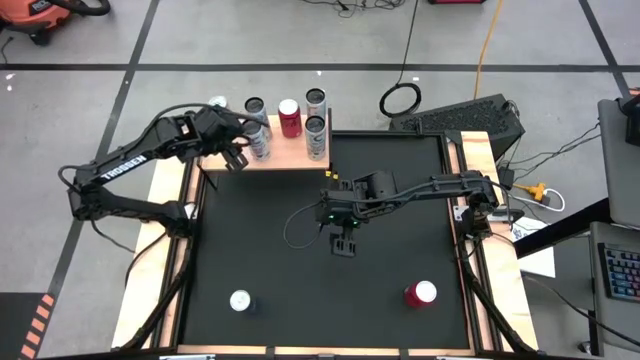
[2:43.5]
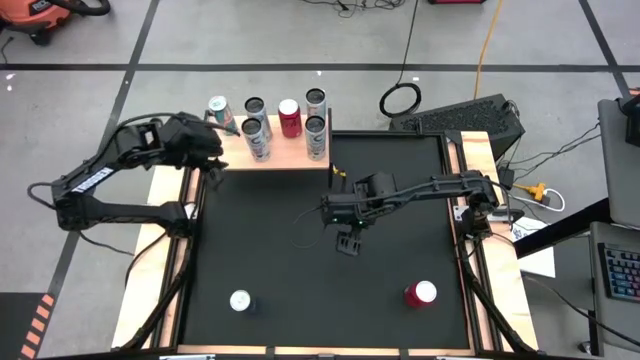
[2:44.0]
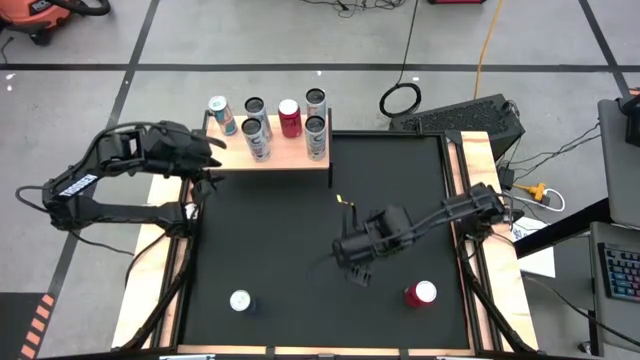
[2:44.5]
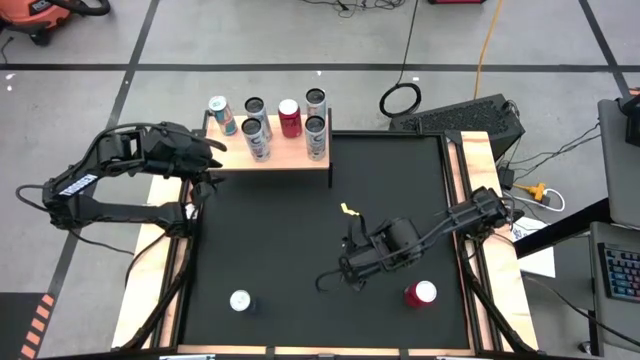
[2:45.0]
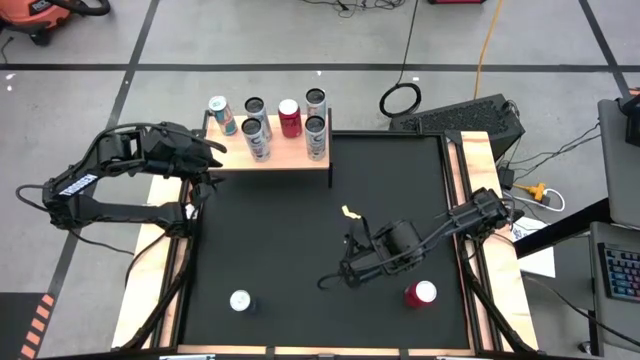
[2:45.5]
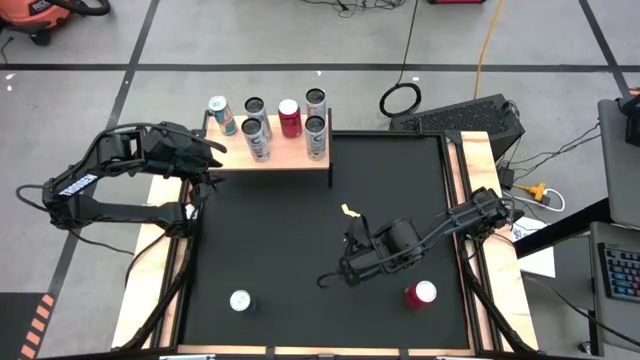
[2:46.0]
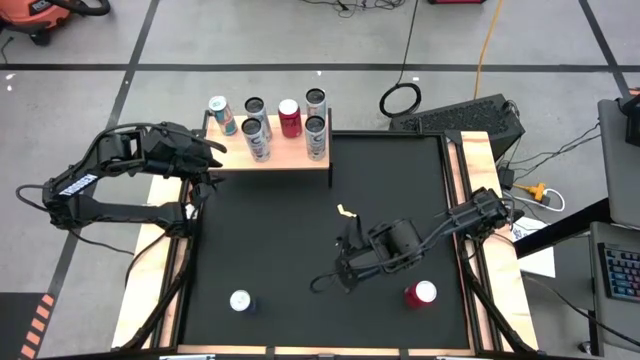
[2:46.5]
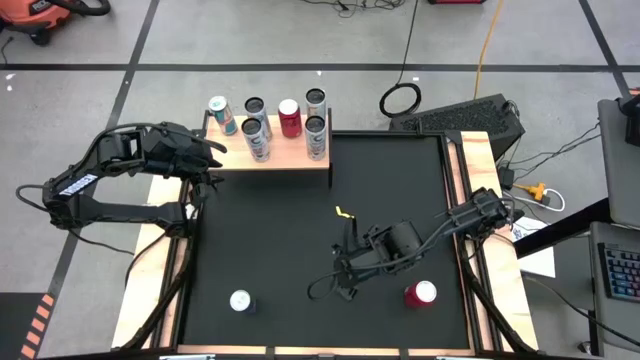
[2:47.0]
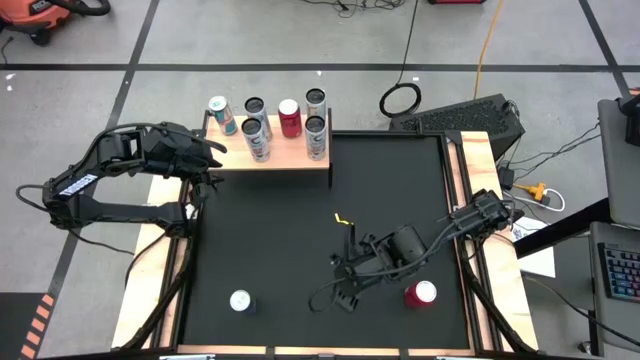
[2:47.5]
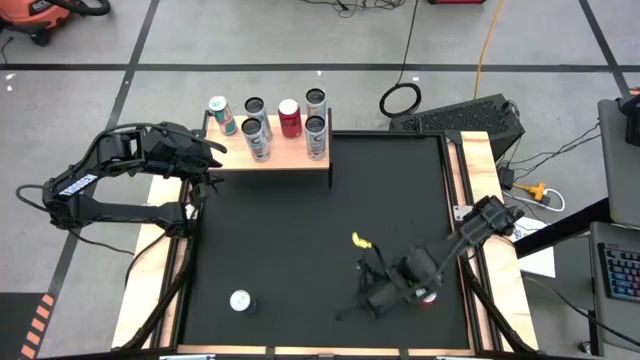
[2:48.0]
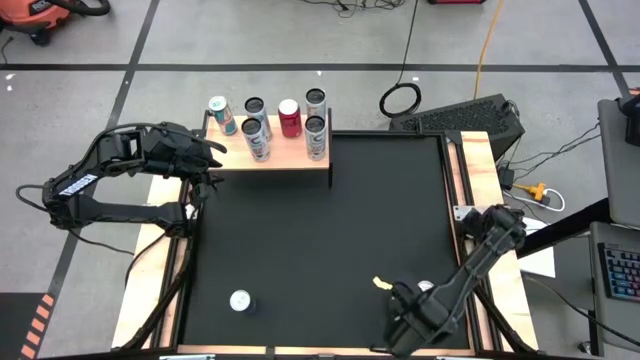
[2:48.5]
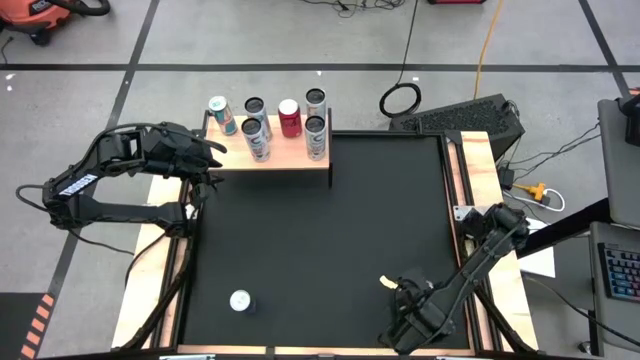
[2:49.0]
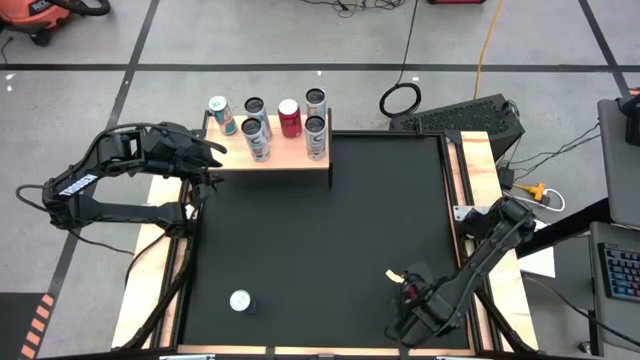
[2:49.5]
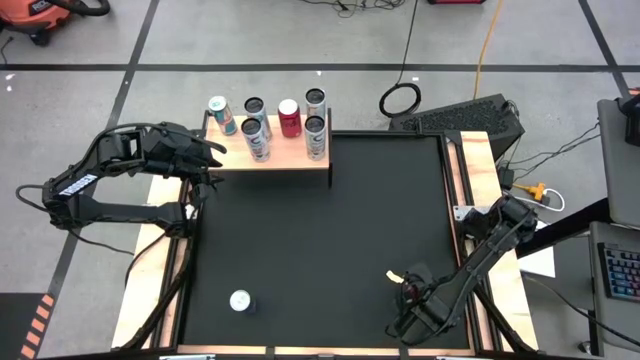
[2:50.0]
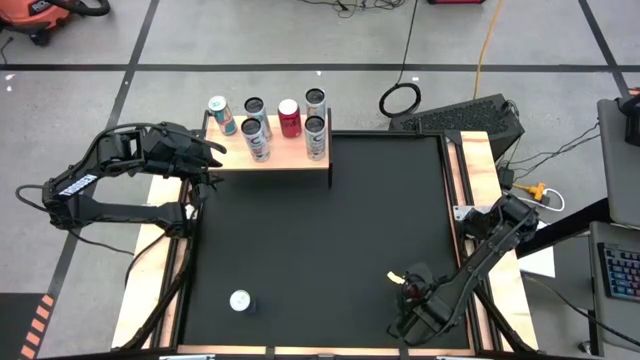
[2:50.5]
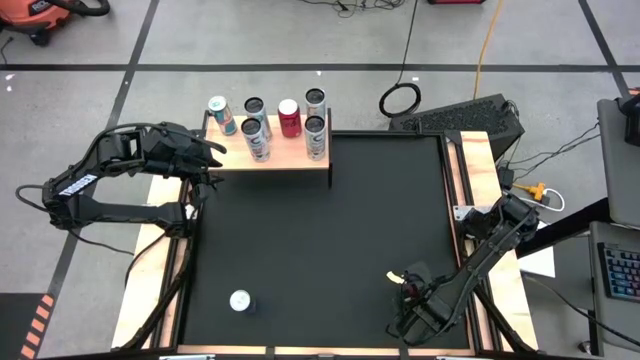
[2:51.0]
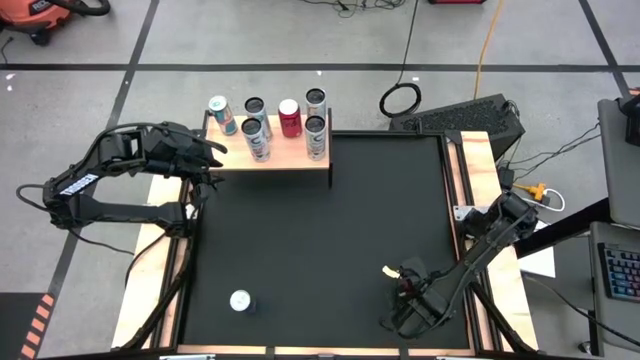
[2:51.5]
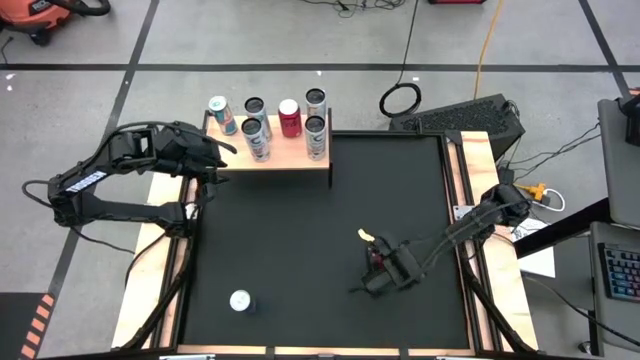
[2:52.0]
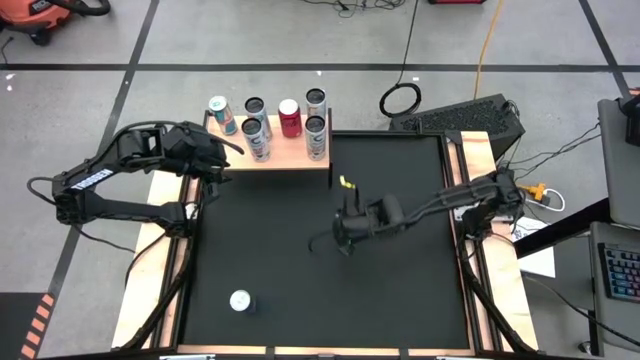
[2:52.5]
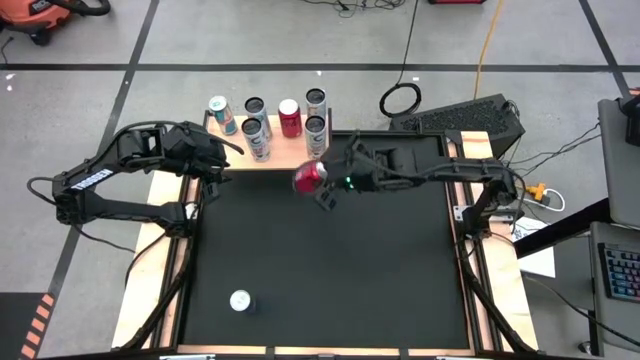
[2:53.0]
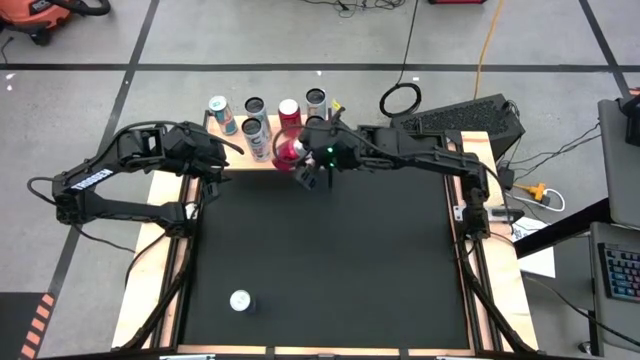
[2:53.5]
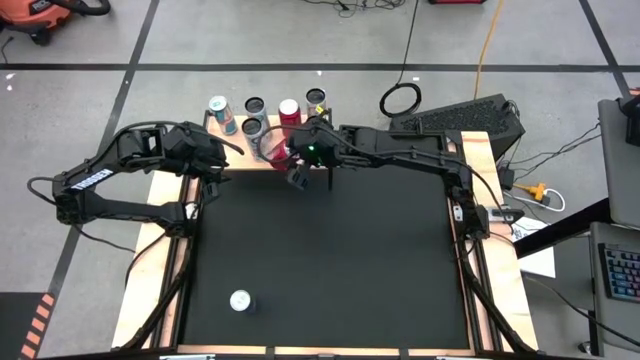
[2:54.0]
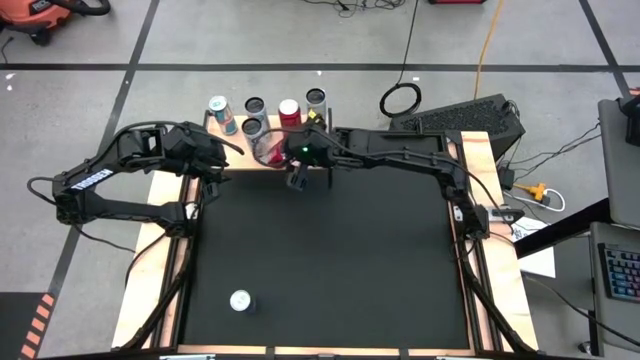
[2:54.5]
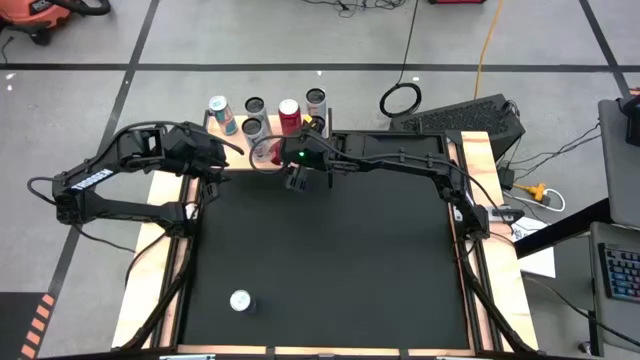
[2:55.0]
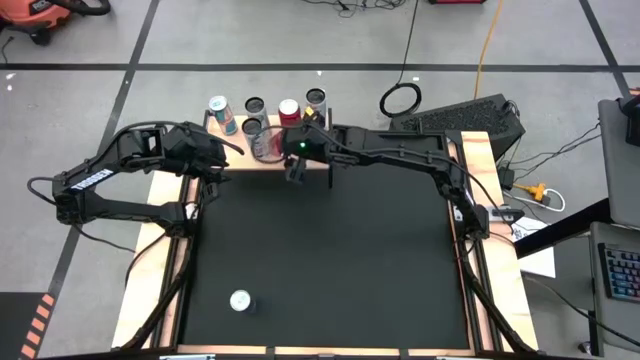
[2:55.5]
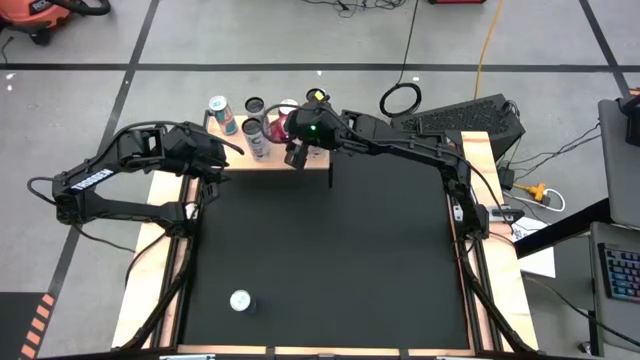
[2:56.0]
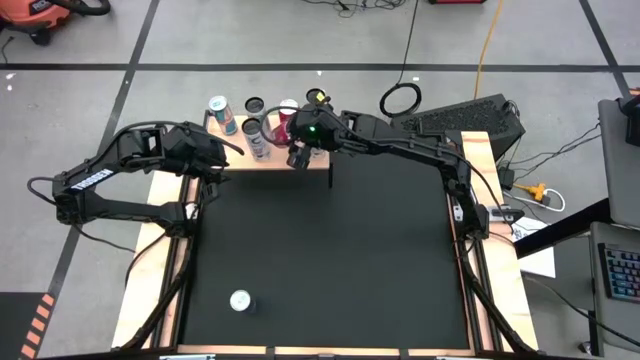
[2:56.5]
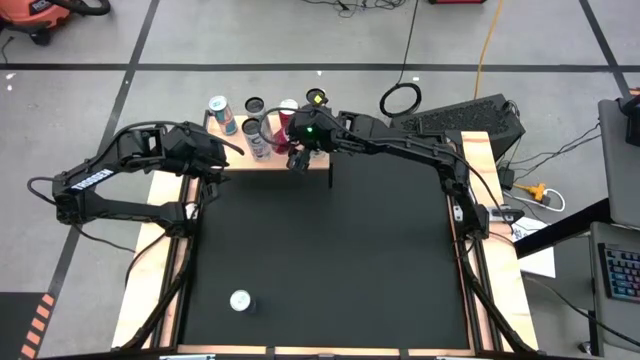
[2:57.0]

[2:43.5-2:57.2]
Task: Place canned beverage on shelf
Put the red soda can on the shelf aligned with the other red soda can

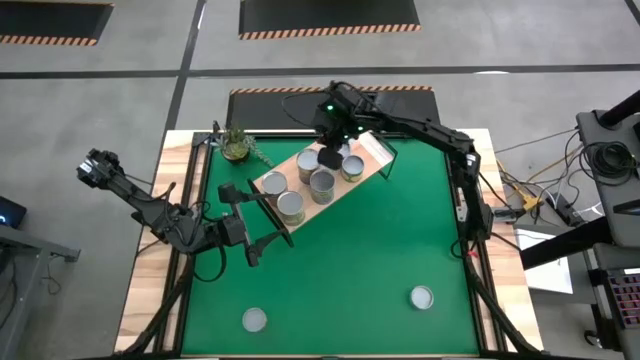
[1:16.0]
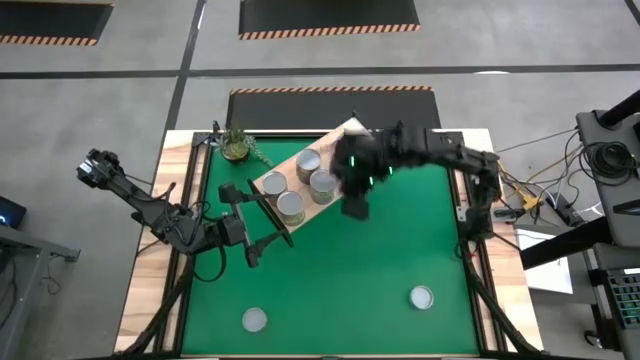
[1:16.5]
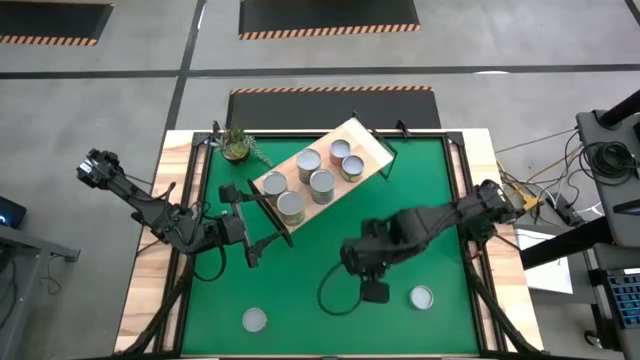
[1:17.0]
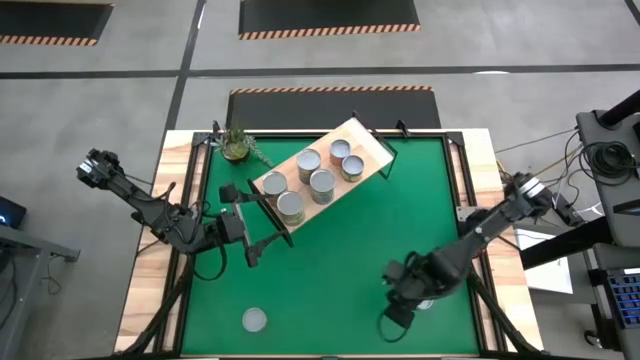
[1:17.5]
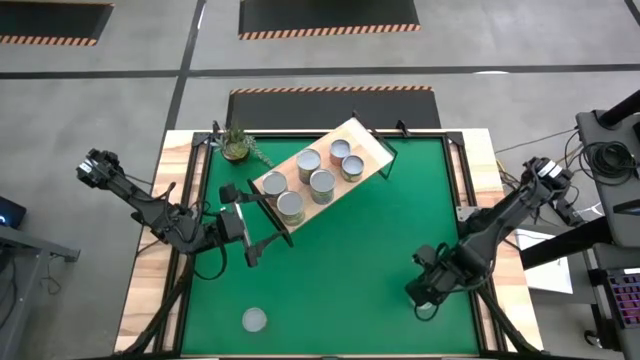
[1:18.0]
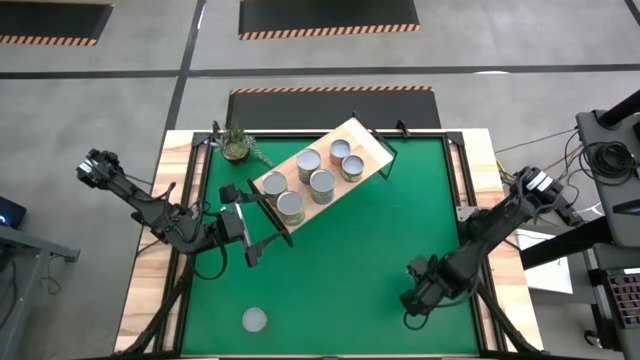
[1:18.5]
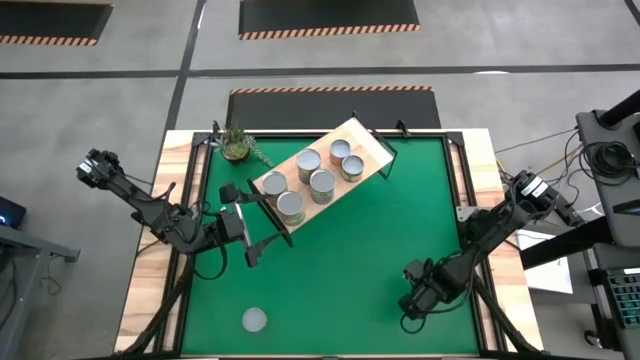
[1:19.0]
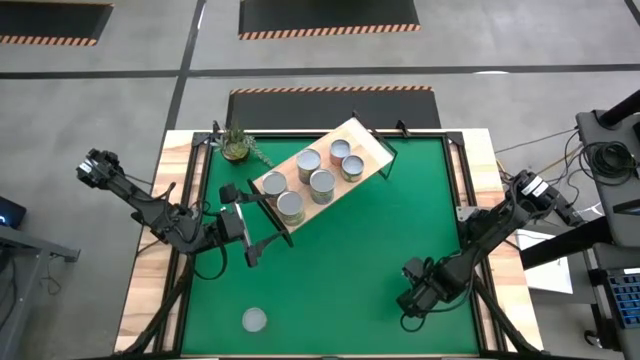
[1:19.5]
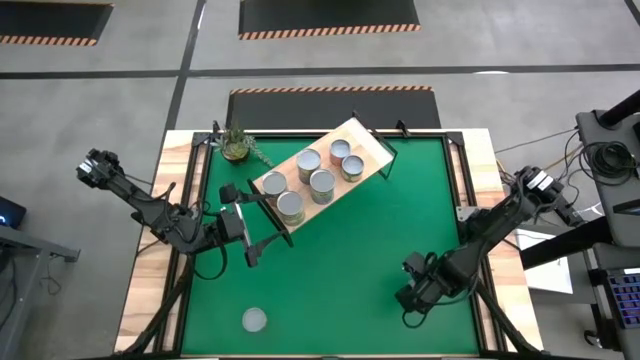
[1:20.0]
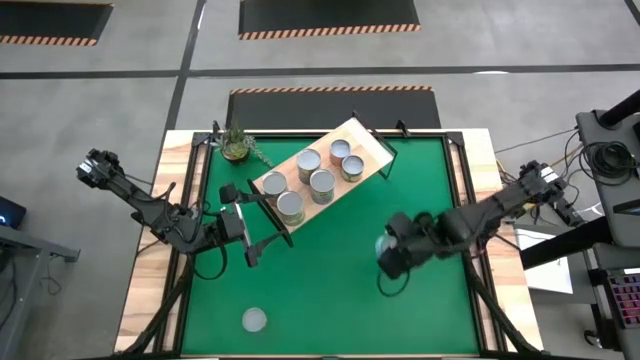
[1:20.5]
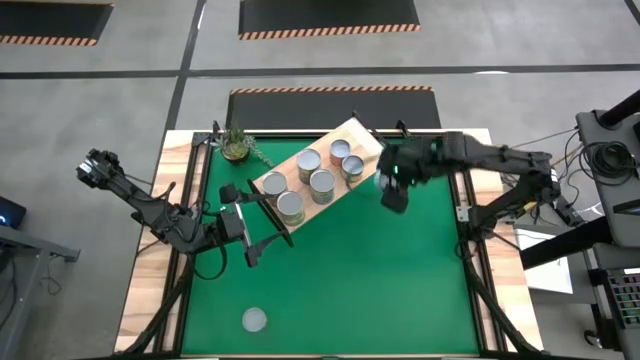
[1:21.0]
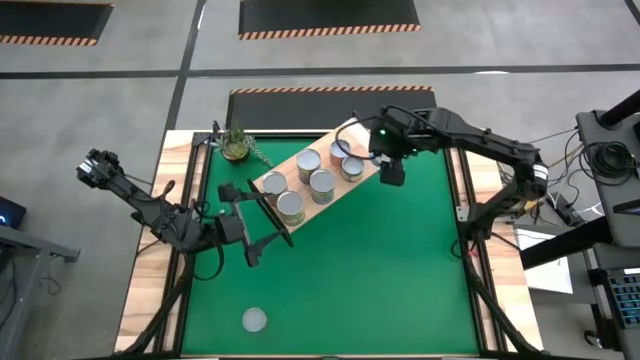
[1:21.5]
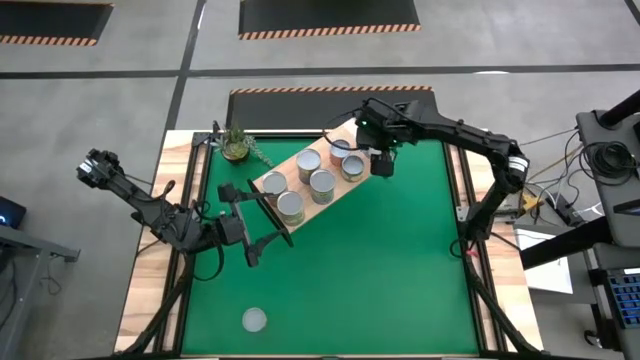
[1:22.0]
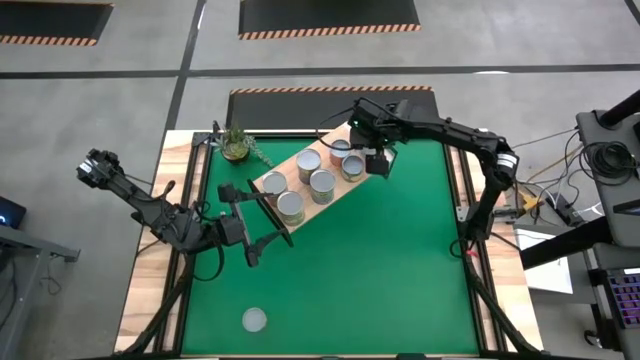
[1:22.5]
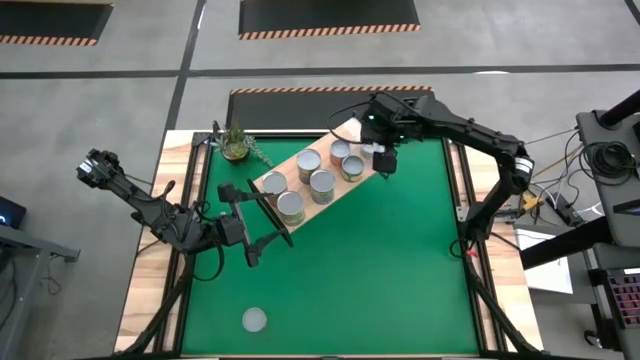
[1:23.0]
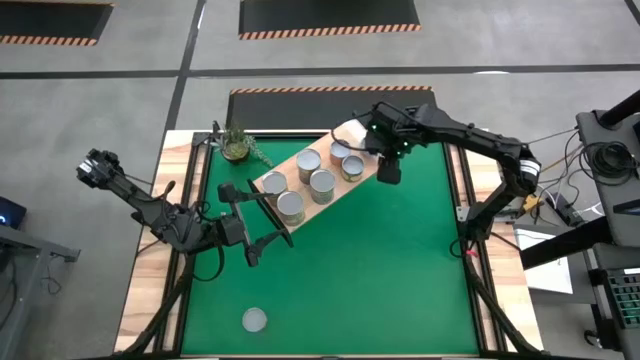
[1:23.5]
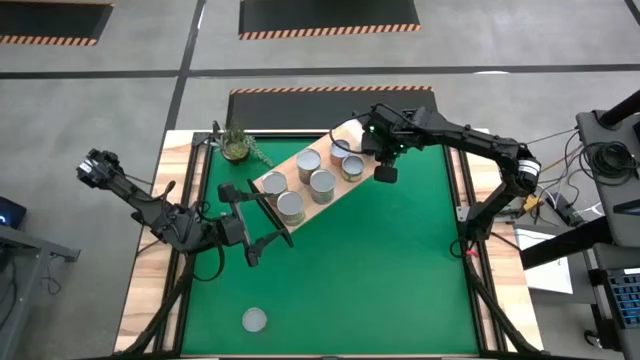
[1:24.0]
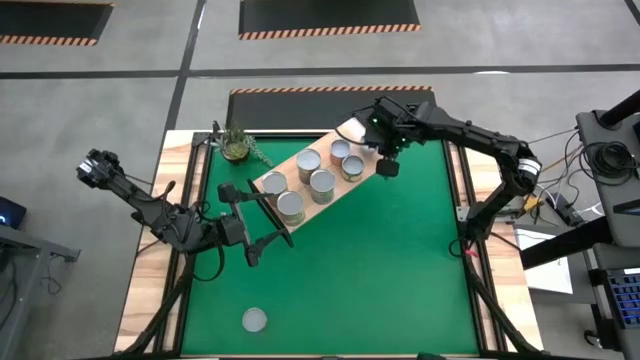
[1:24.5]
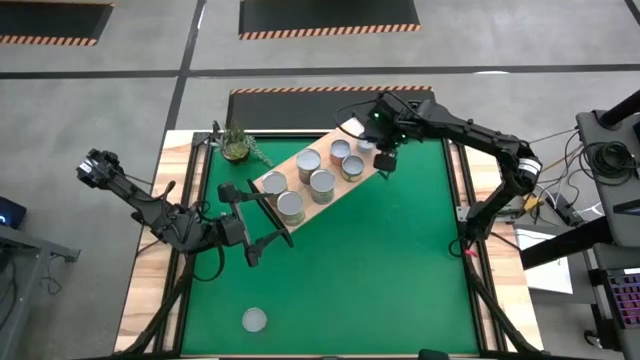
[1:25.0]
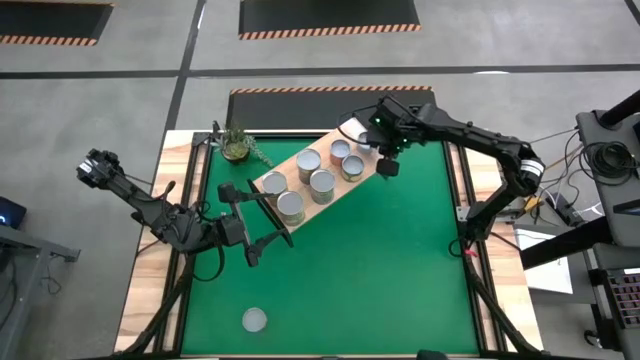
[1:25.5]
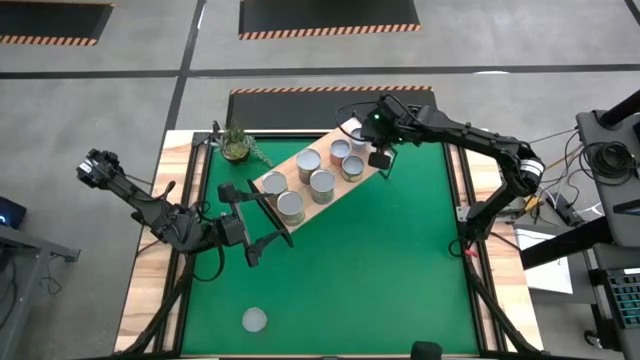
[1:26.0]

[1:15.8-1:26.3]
Task: Pick and place cans onto a shelf
Put the light blue can on the shelf
